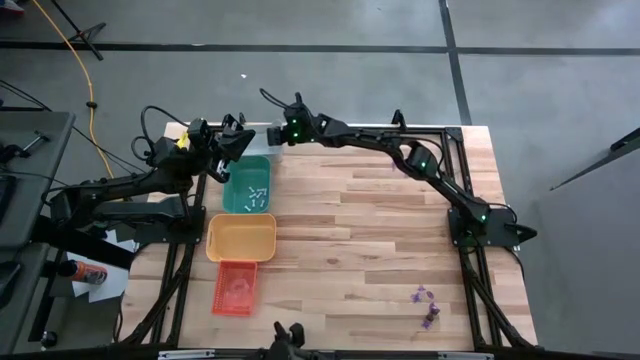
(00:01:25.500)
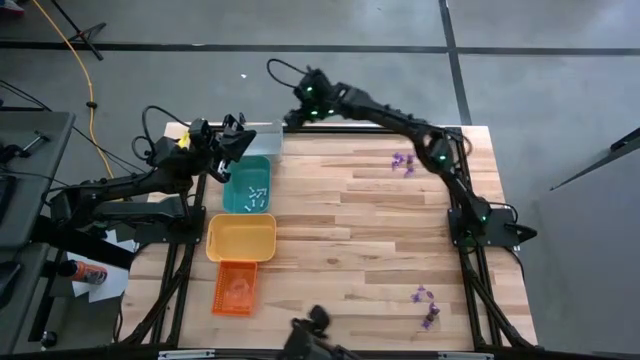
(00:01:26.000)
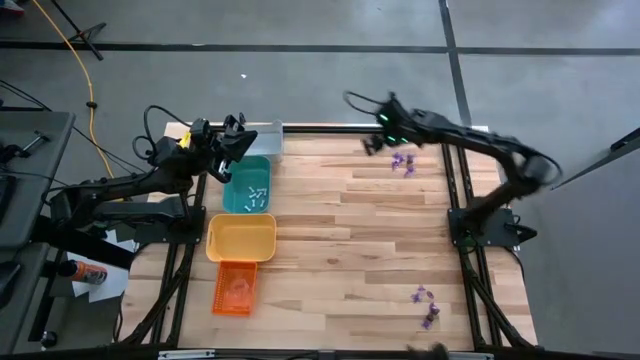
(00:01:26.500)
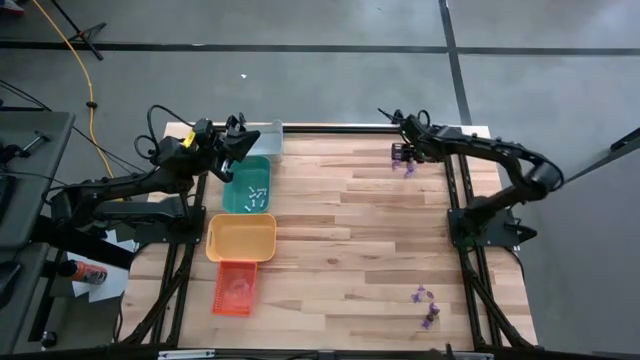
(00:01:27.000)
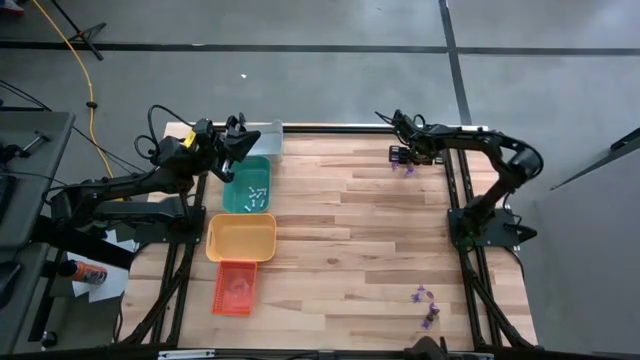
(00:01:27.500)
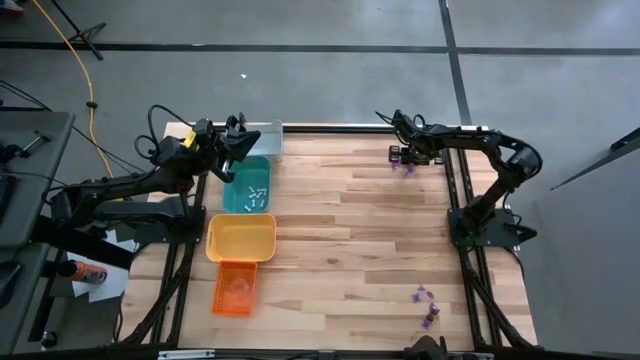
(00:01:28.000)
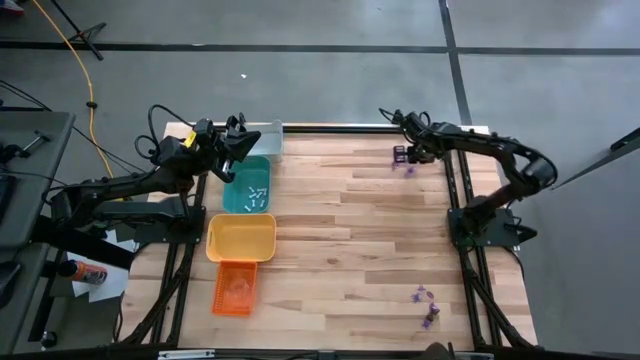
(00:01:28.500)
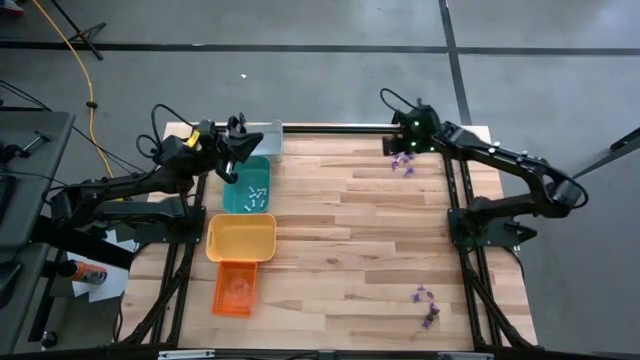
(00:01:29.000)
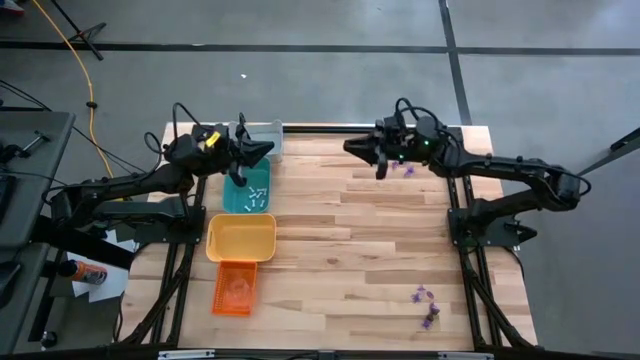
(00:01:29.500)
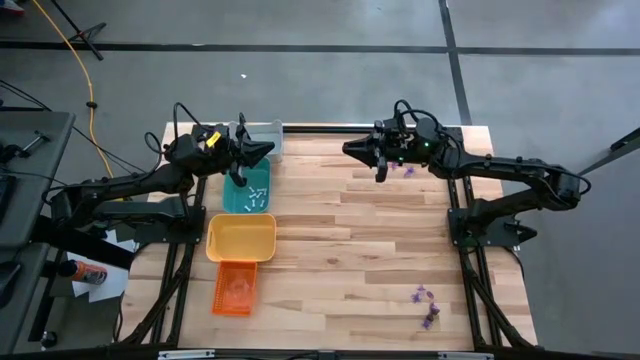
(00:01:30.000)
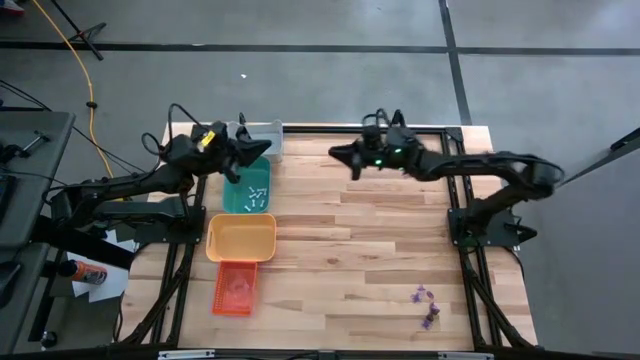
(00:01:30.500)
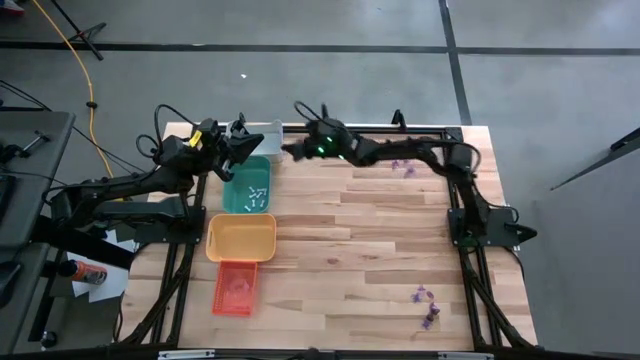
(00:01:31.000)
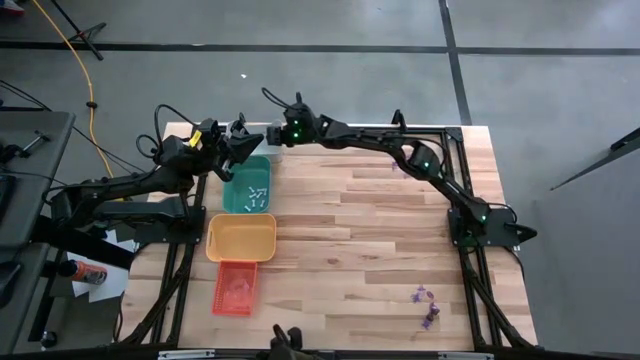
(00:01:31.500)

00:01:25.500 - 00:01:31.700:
Task: Sort Halloween decoration
Put the black skull toy in the white bin

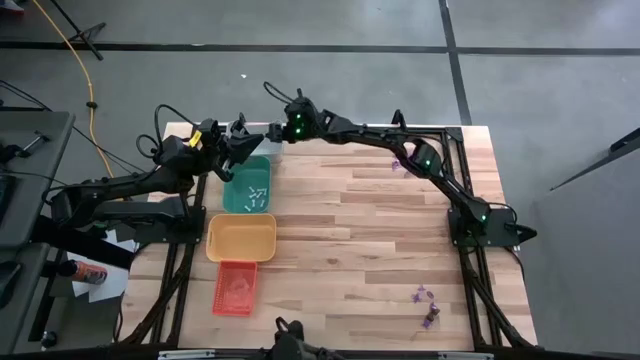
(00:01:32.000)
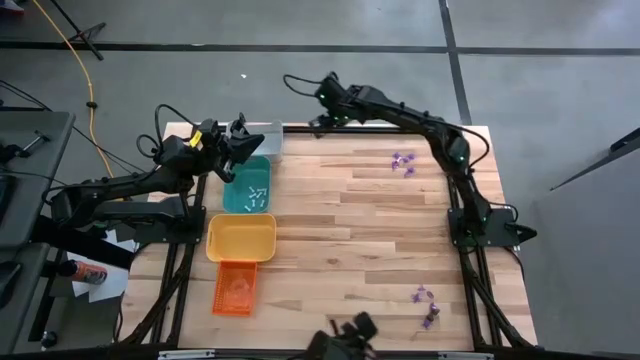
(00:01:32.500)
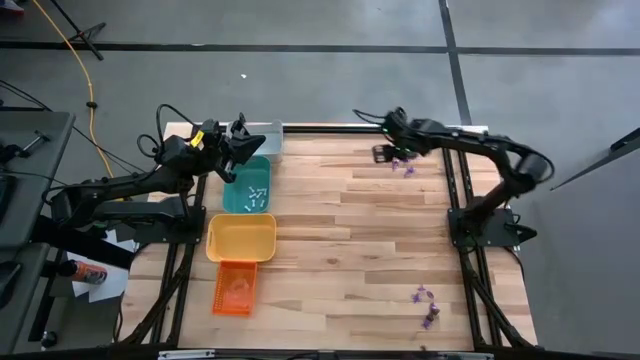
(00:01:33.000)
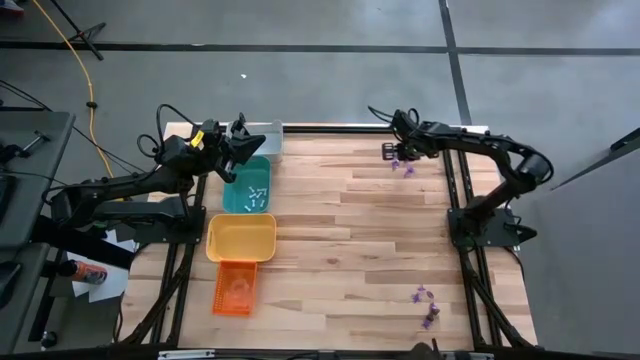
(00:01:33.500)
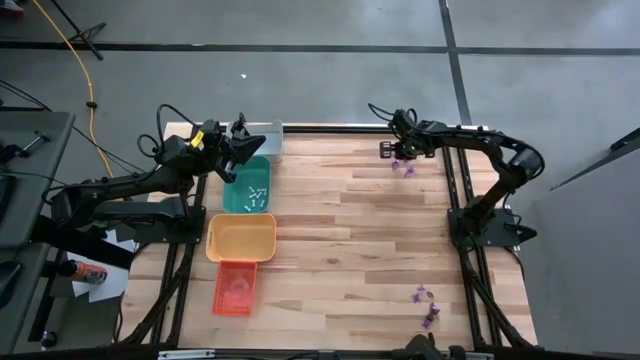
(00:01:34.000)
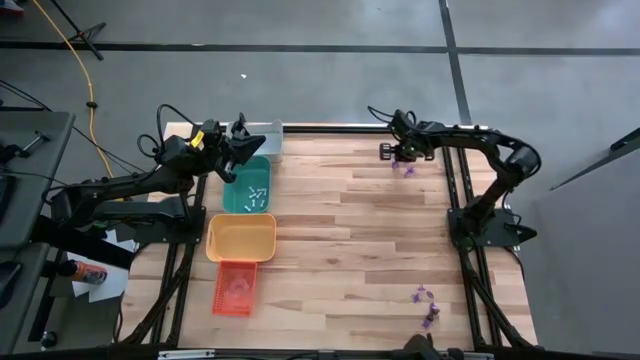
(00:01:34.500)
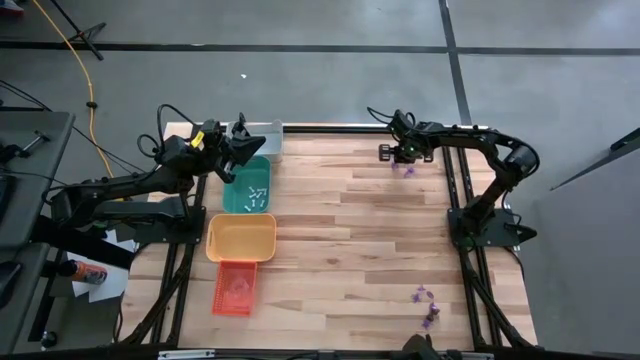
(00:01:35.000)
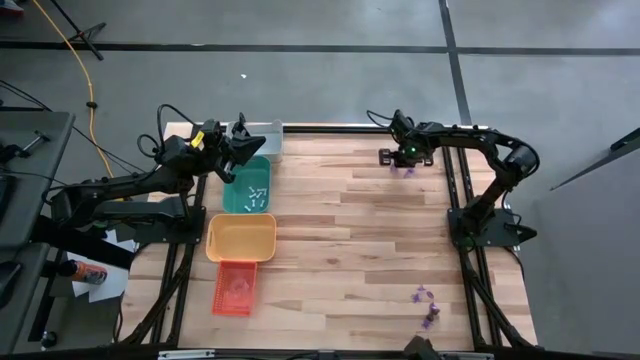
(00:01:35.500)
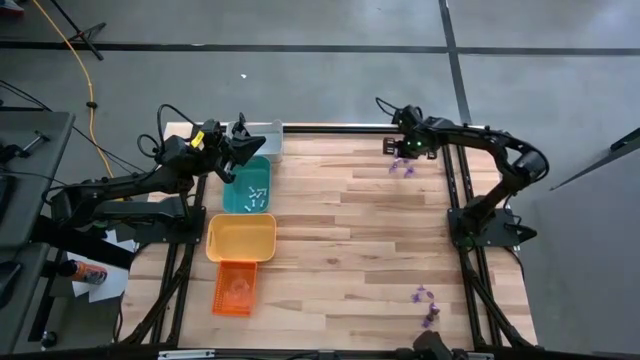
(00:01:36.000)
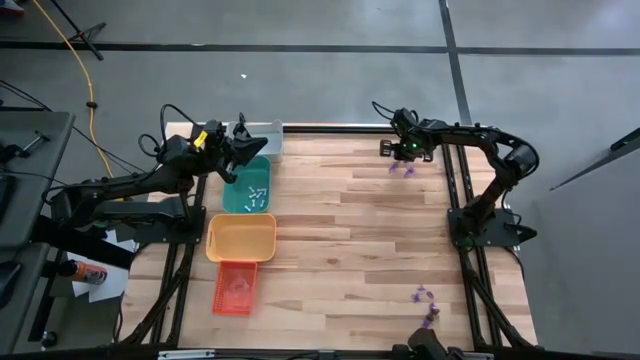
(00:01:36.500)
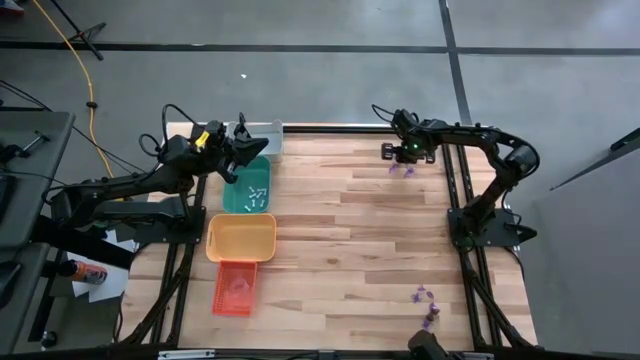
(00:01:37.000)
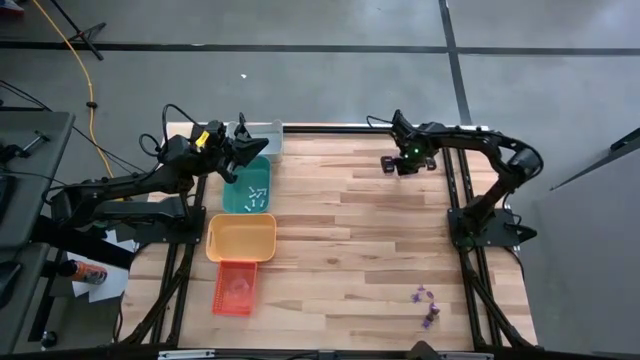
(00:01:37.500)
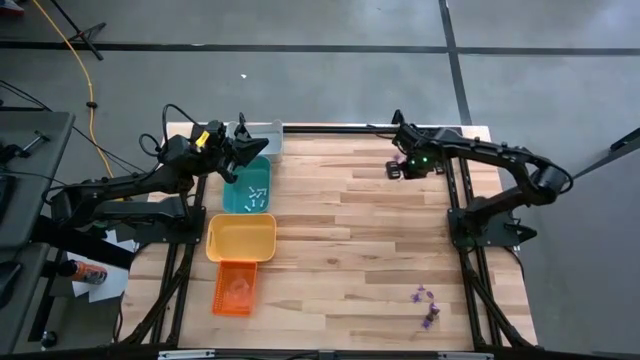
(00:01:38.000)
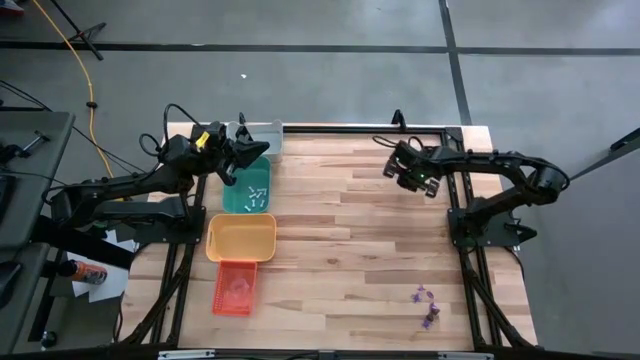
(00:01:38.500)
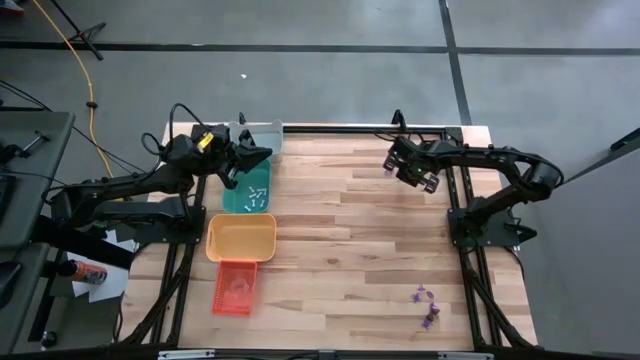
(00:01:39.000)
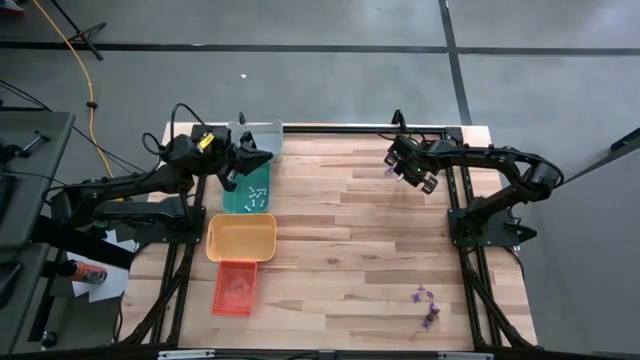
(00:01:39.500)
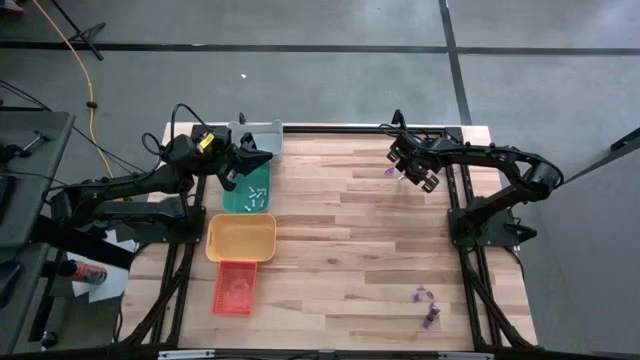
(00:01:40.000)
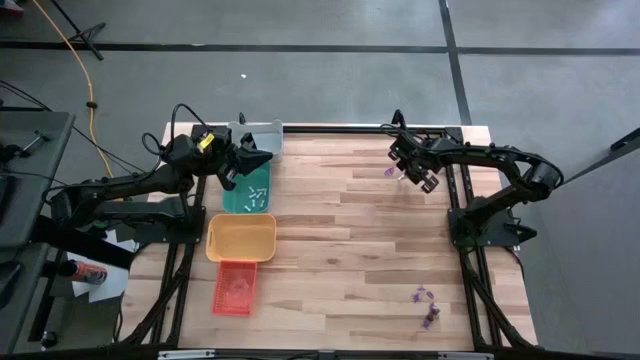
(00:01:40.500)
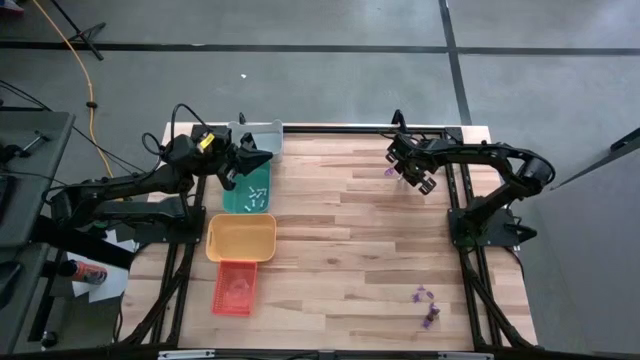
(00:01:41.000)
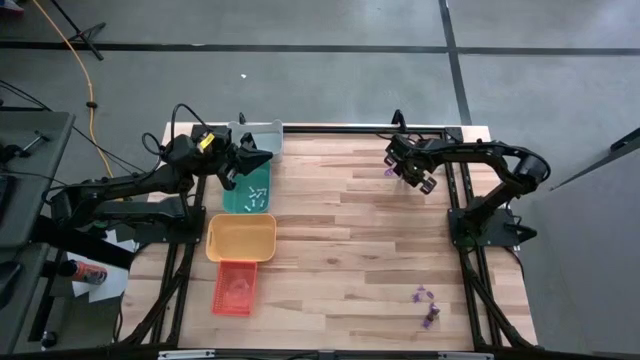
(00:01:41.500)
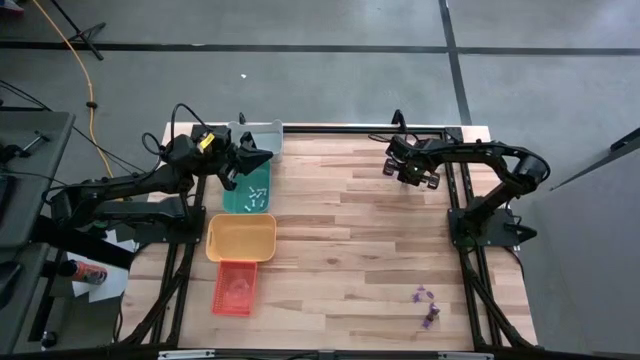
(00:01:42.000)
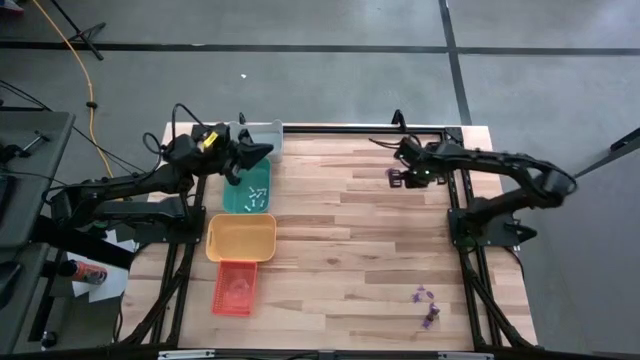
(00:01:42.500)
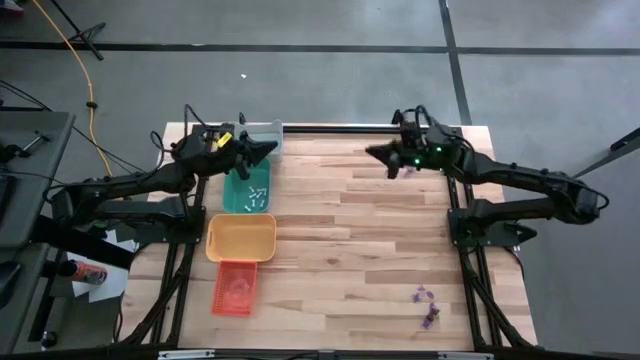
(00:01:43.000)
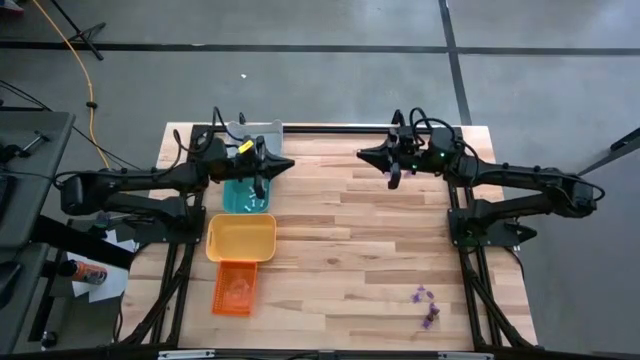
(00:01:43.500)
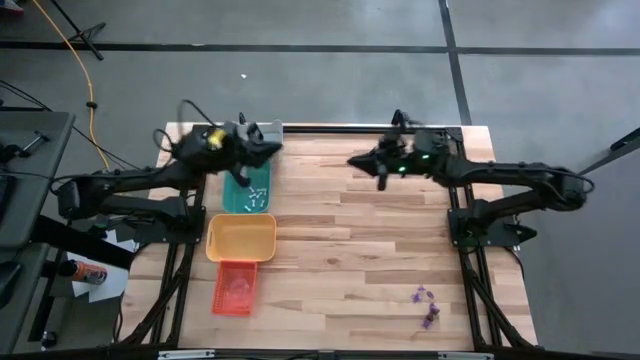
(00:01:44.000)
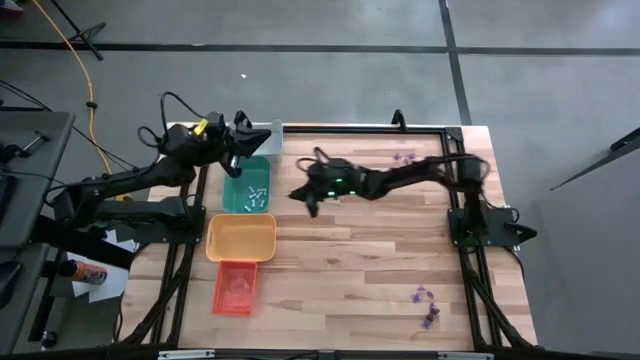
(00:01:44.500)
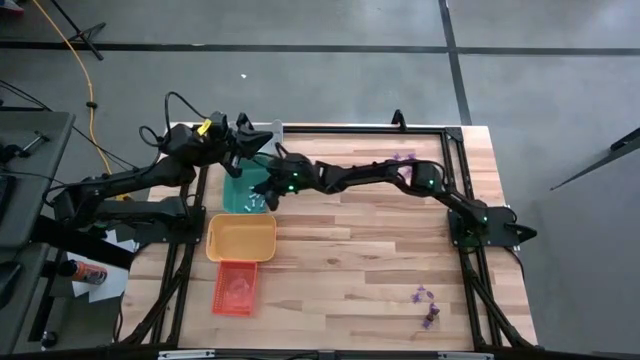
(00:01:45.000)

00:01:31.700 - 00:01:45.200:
Put the white bone toy in the green bin
